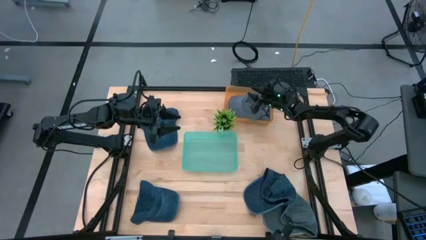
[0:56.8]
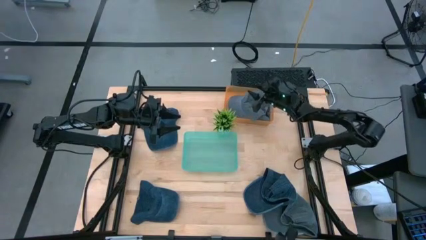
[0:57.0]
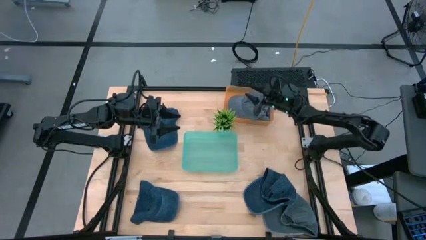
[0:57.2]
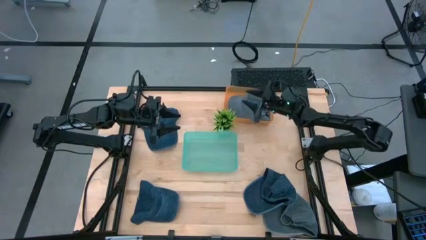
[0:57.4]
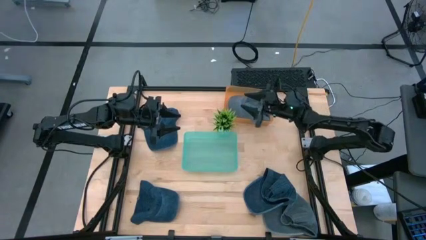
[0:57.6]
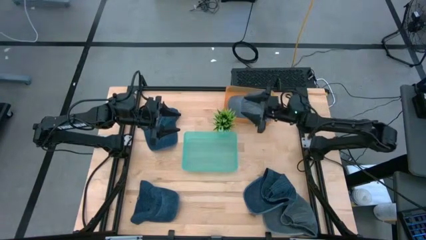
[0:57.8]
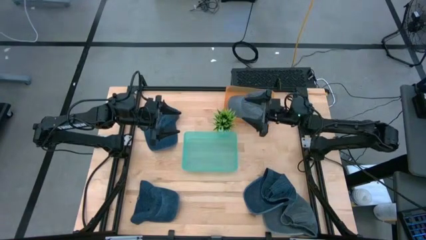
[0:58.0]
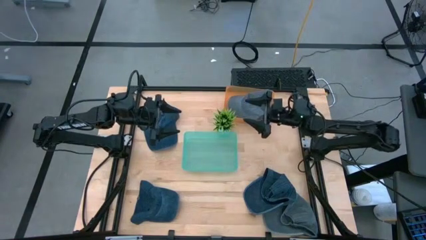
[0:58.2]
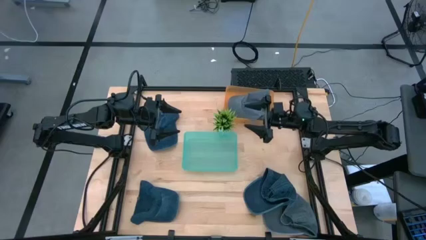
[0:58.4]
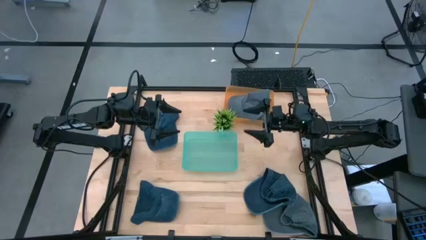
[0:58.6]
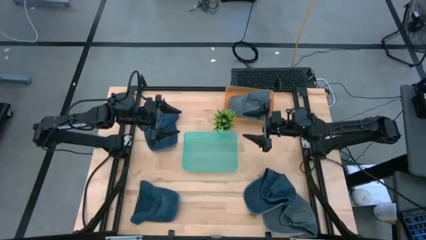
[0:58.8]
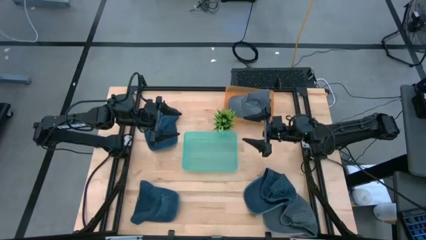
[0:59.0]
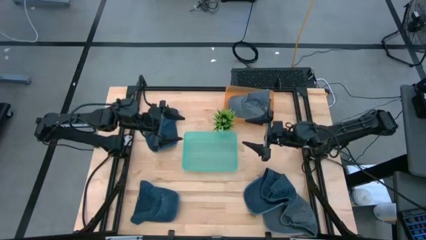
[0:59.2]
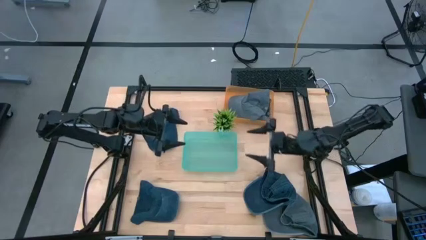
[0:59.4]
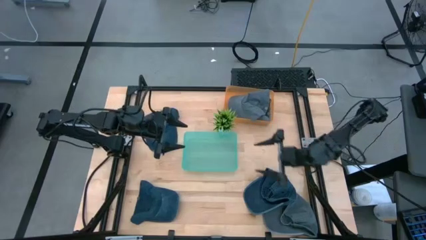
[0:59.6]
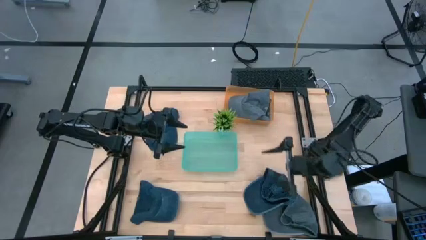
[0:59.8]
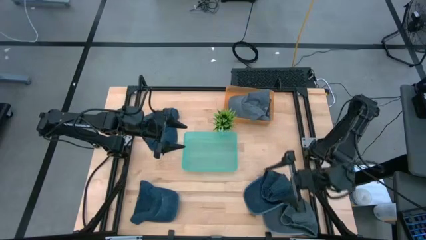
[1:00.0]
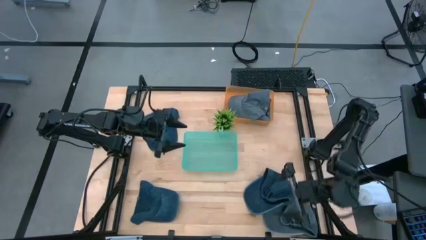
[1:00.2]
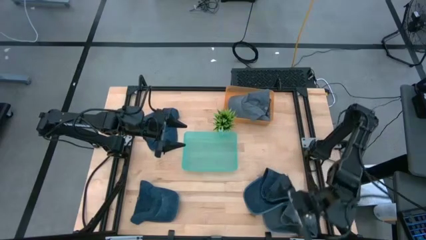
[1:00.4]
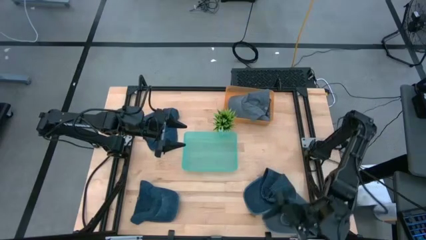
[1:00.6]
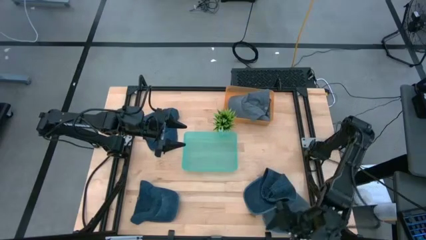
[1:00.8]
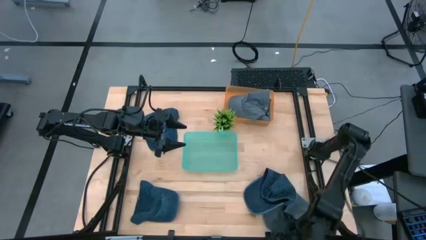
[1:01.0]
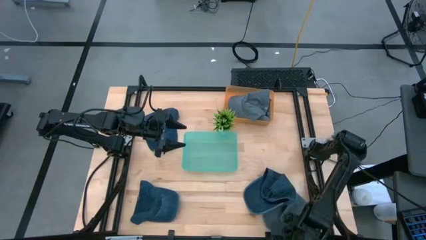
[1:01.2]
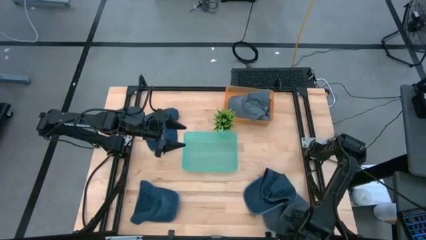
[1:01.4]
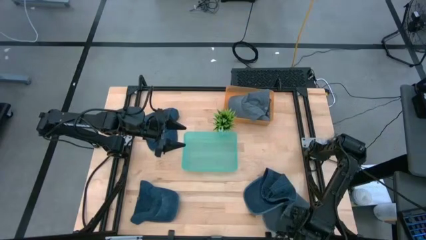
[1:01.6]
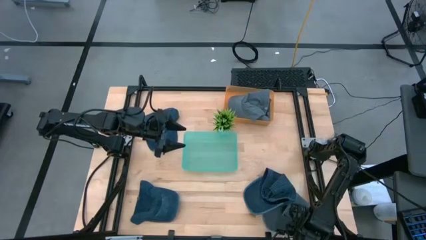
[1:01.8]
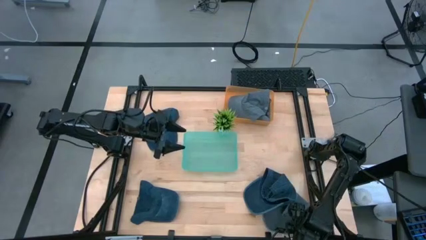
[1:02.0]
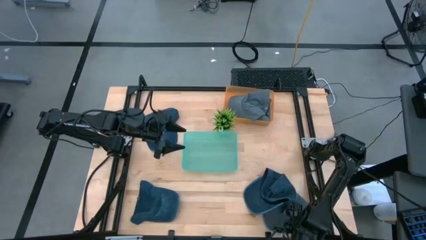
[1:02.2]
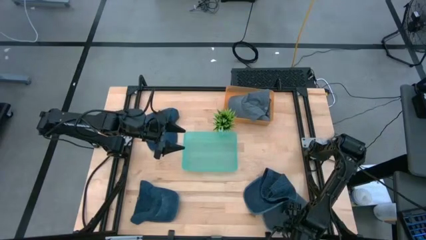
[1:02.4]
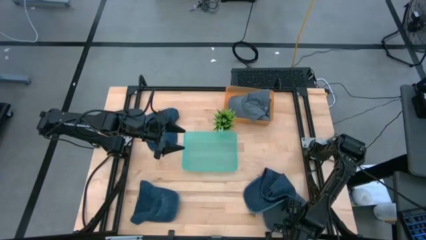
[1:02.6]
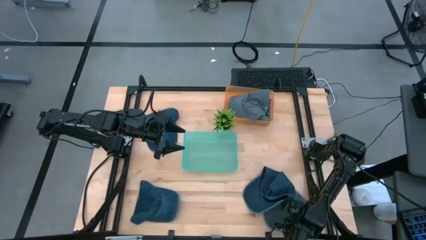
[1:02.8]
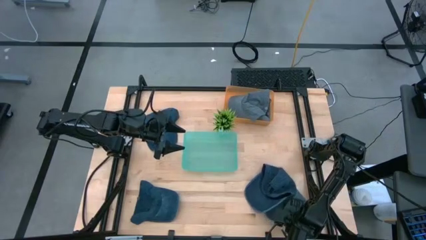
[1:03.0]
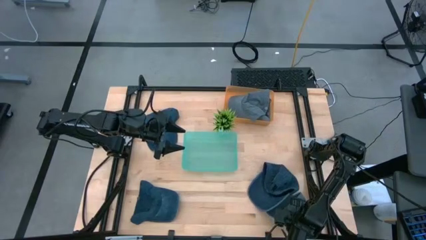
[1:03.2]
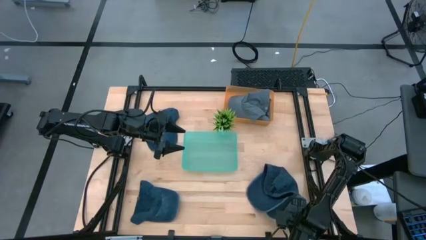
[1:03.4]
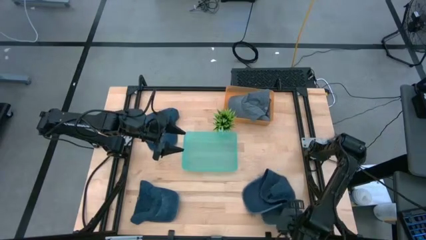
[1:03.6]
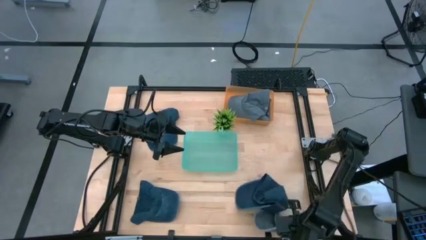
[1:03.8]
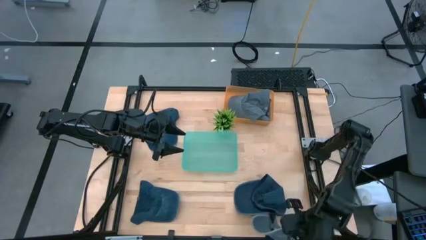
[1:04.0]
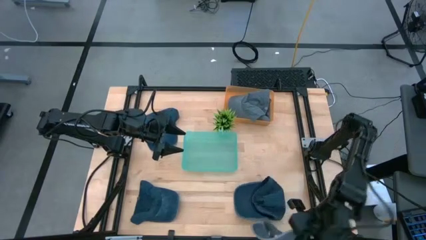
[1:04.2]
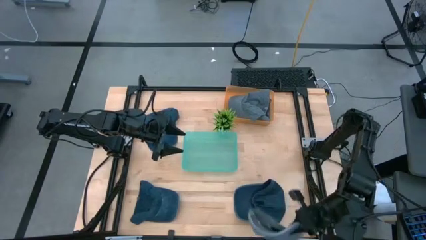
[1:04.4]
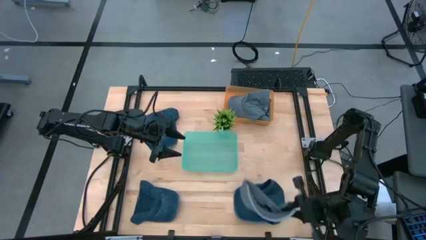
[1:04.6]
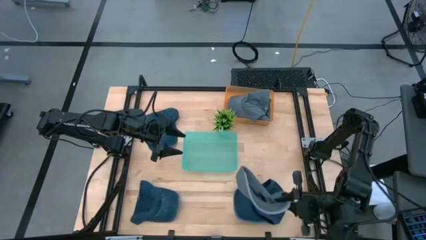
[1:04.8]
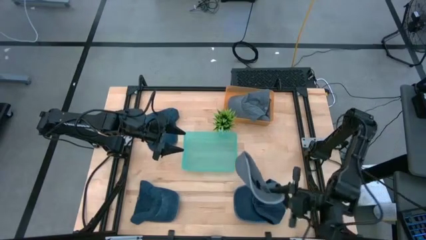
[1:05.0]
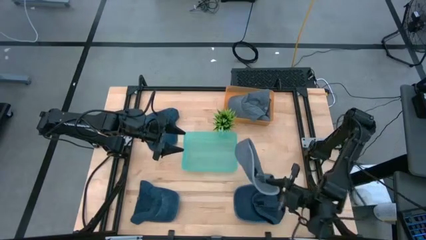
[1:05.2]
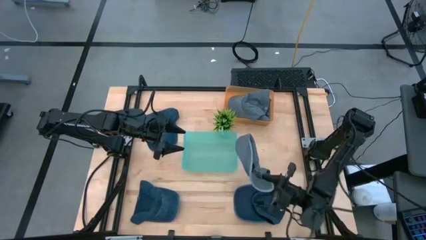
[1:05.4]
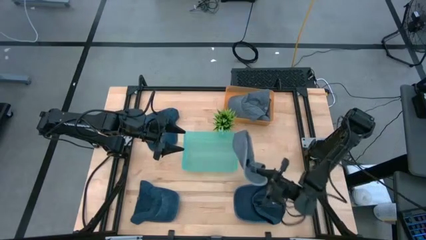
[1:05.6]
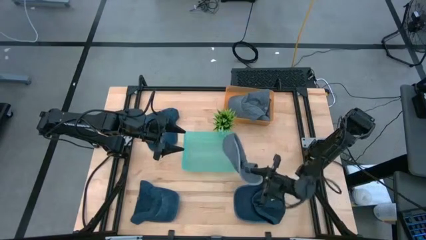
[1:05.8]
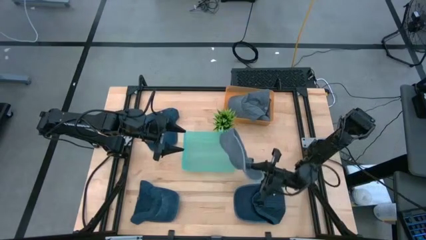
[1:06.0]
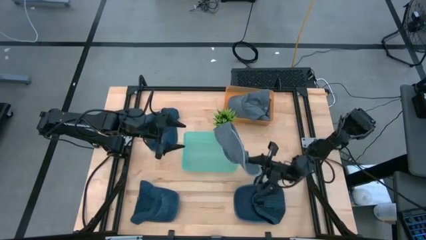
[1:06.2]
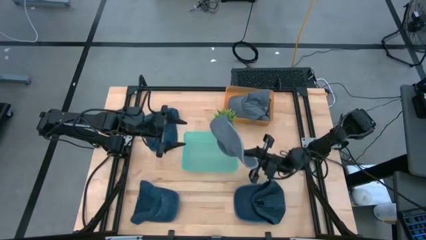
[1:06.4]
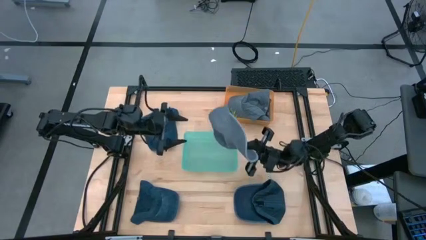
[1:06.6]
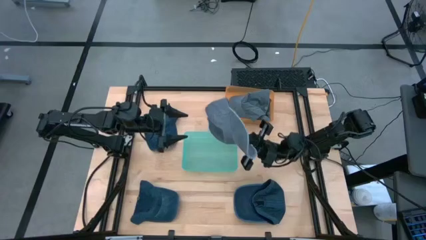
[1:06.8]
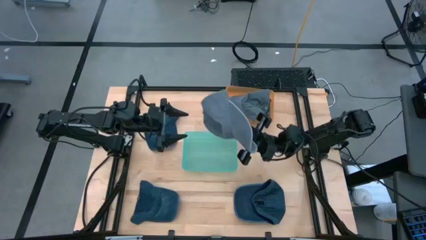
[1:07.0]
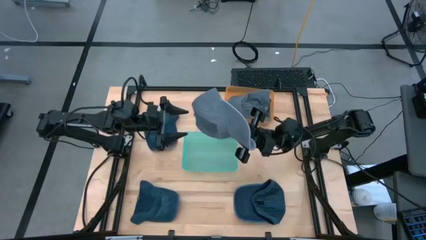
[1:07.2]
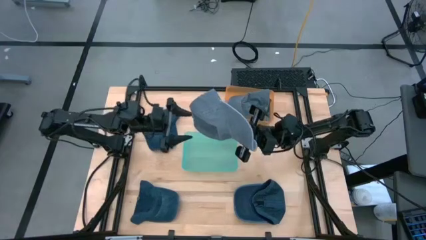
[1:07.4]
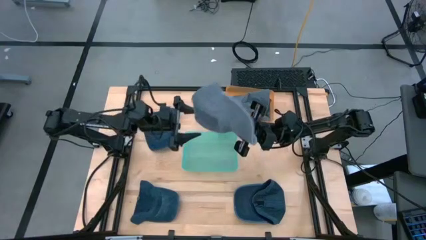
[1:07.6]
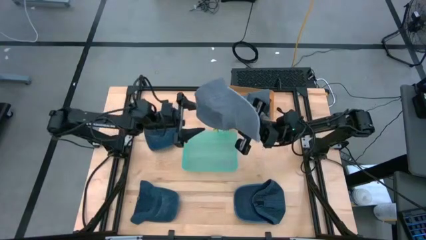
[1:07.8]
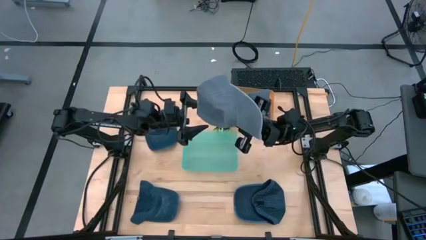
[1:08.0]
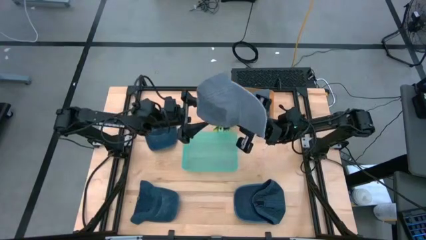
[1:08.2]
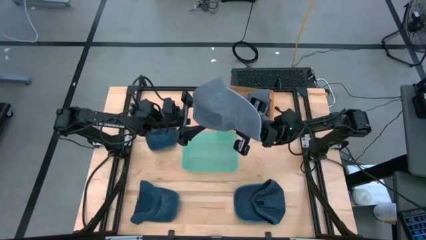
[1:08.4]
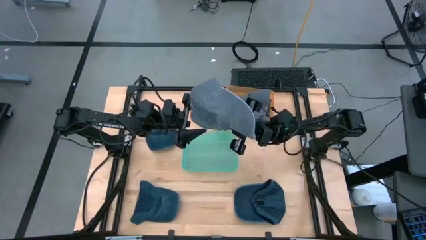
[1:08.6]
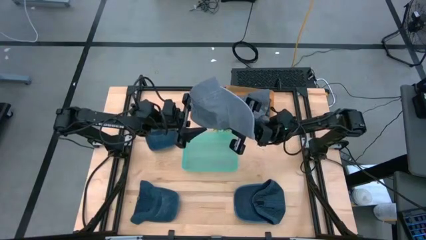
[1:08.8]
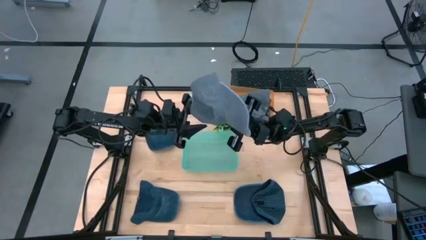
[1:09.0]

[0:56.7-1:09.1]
Task: Pick & Place hat
Put the gray cap into the orange bin

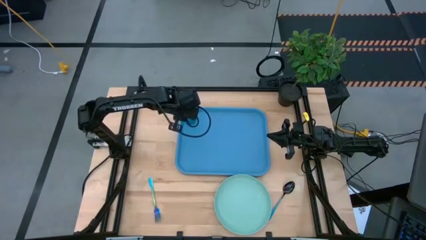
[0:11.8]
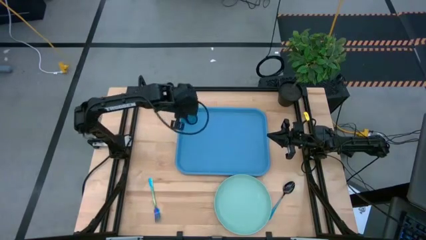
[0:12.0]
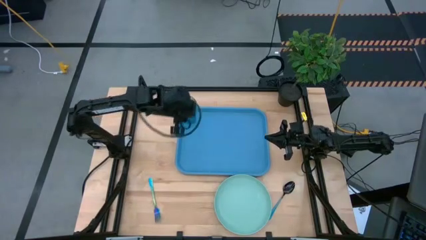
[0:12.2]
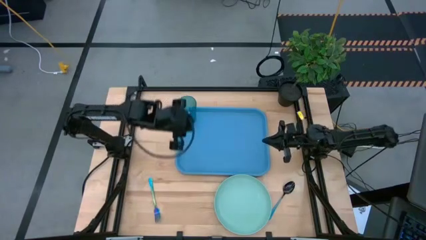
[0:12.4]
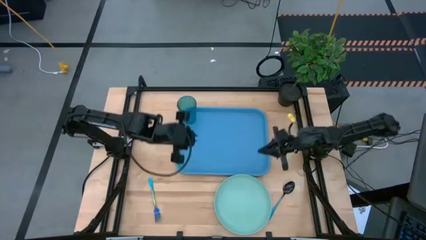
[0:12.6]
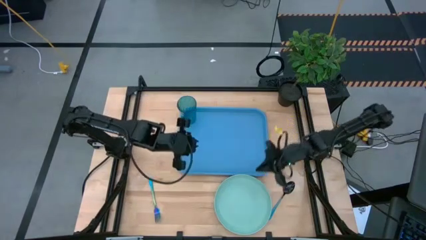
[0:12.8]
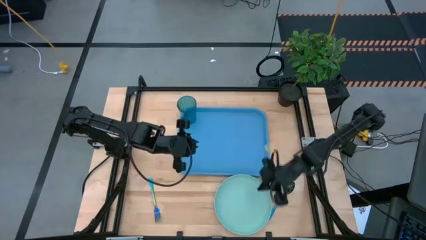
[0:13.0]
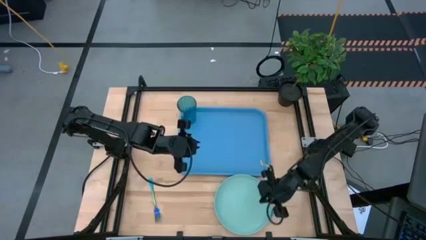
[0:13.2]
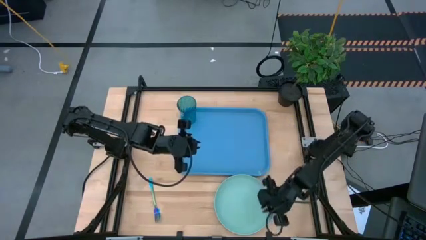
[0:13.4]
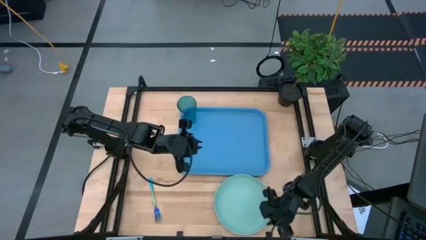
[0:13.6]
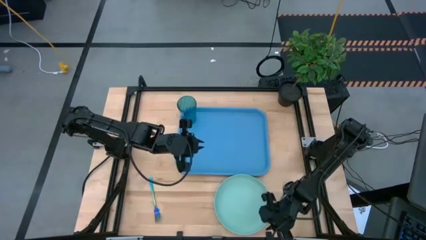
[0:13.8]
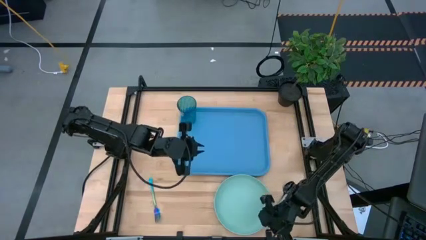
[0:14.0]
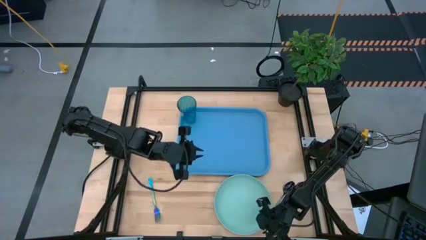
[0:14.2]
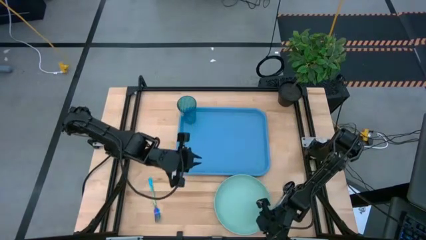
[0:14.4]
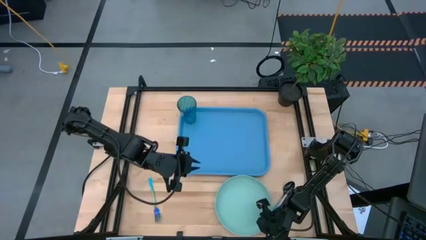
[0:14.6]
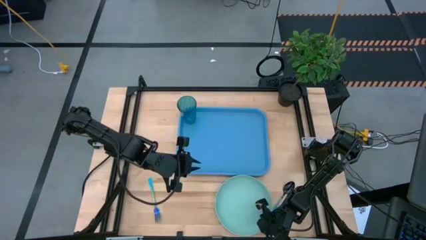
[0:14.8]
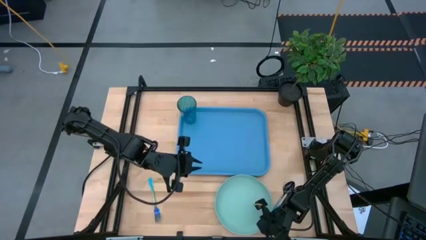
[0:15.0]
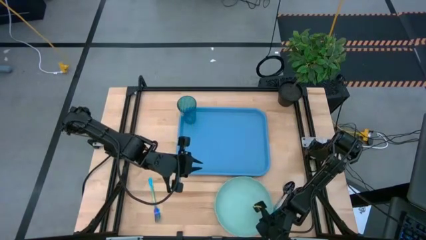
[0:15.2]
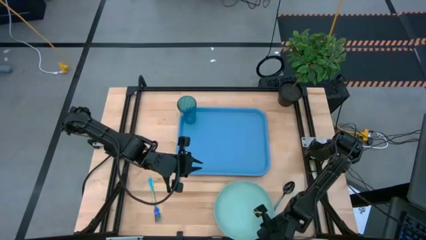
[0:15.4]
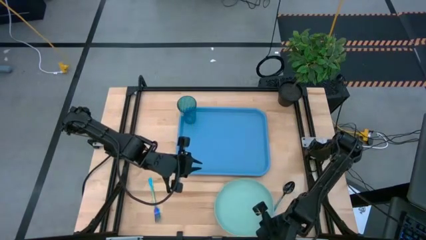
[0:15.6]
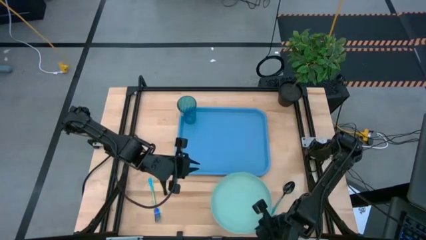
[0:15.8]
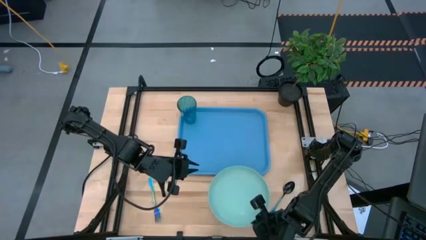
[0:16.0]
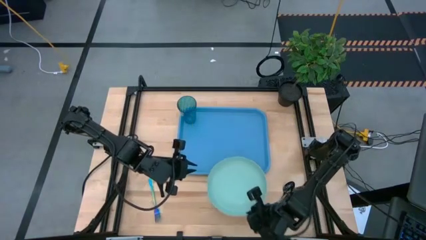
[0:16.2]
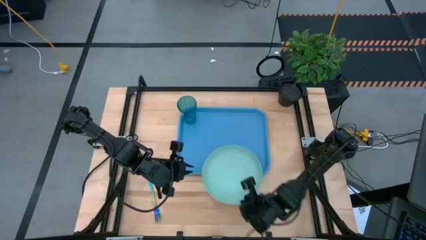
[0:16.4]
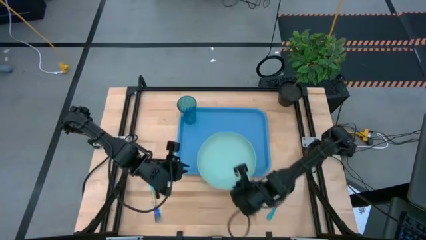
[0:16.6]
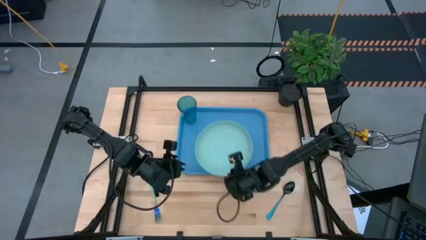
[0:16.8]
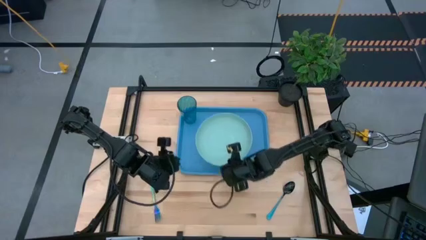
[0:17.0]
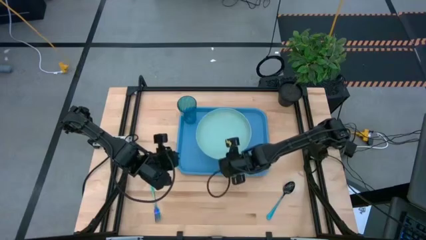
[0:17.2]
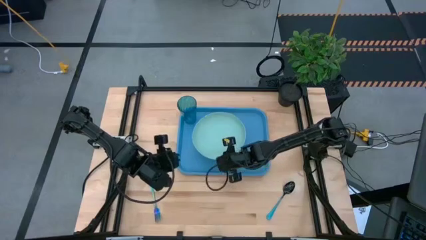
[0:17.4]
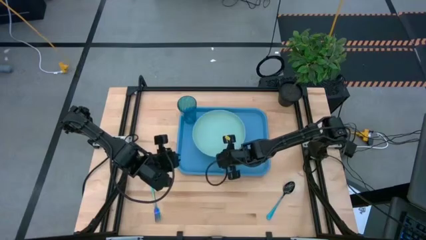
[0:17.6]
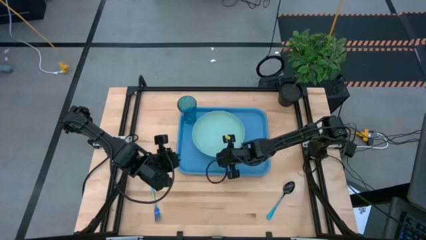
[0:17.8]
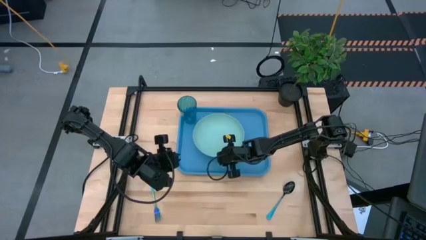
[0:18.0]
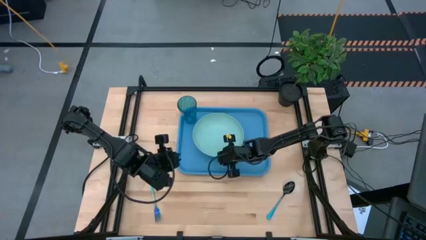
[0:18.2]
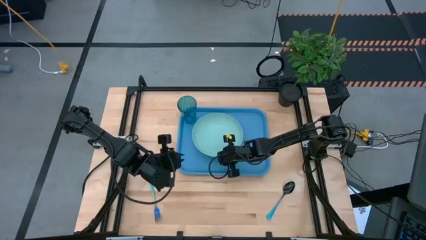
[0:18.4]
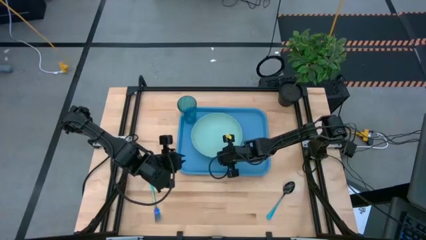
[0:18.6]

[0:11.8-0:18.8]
Task: Pick and place plate/cup/fork/spoon on tray
Put the light blue plate on the blue serving tray
